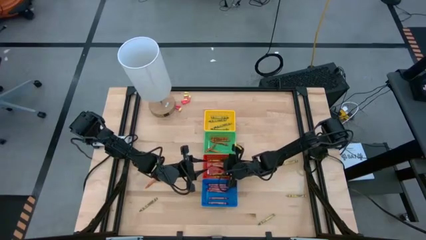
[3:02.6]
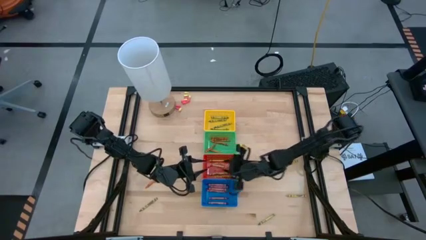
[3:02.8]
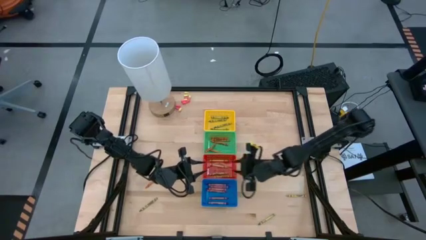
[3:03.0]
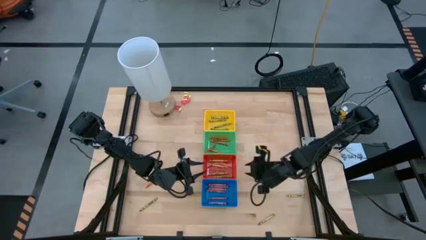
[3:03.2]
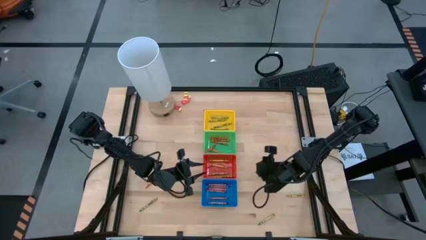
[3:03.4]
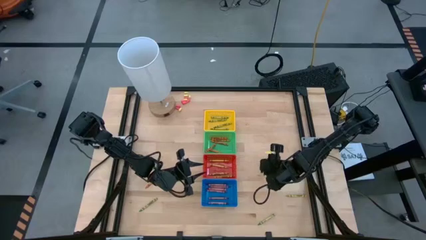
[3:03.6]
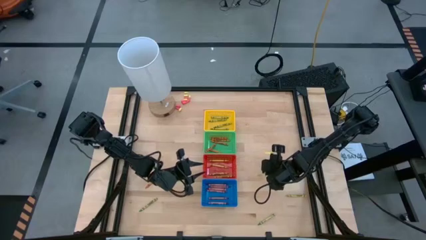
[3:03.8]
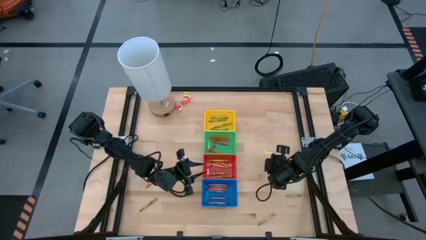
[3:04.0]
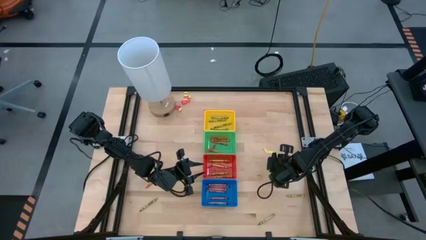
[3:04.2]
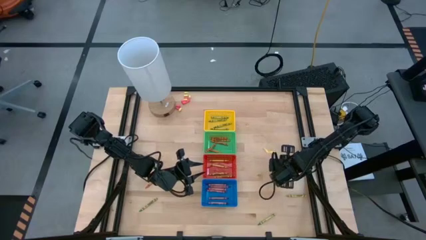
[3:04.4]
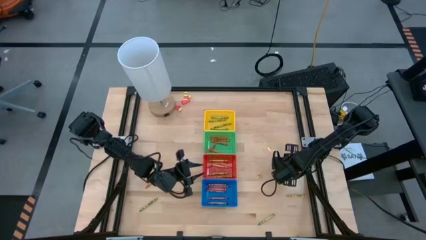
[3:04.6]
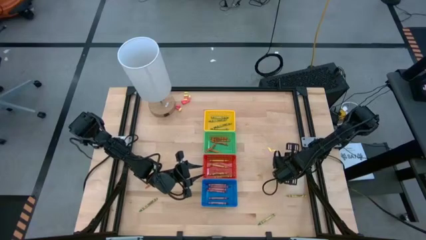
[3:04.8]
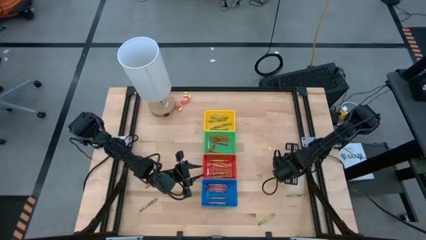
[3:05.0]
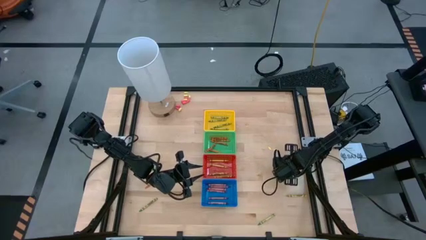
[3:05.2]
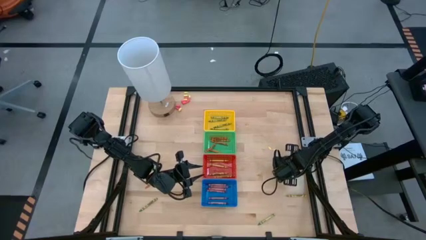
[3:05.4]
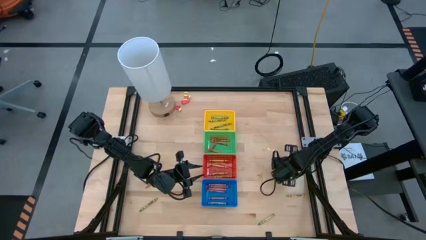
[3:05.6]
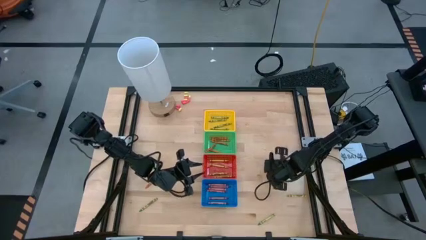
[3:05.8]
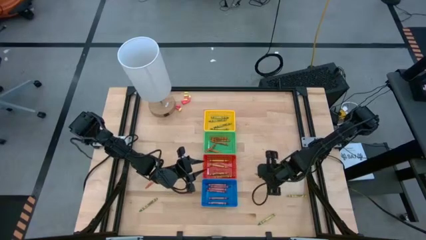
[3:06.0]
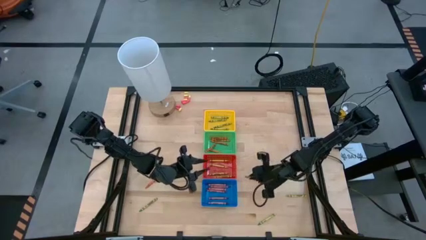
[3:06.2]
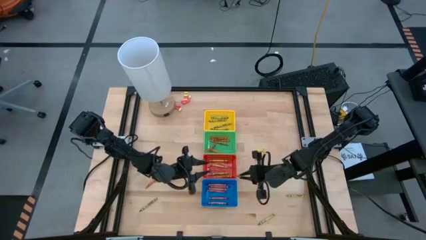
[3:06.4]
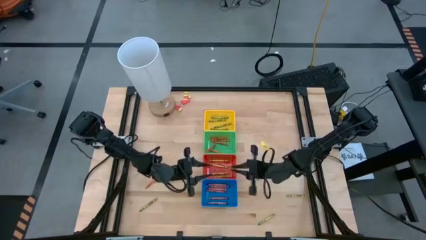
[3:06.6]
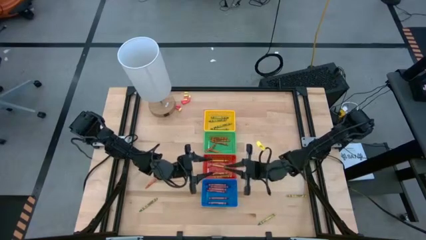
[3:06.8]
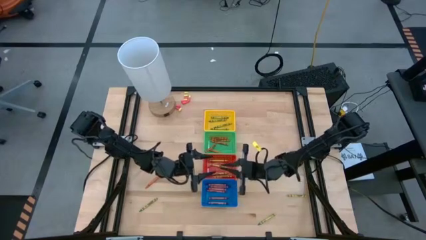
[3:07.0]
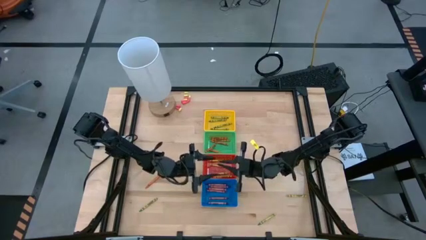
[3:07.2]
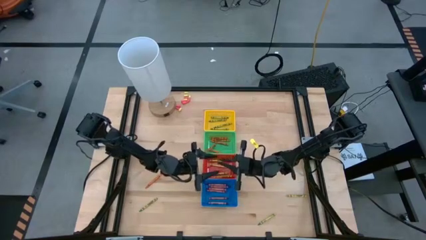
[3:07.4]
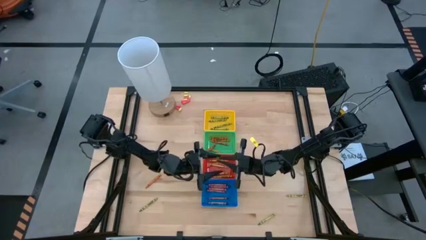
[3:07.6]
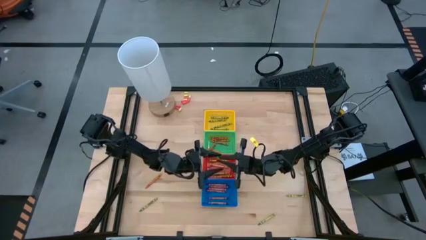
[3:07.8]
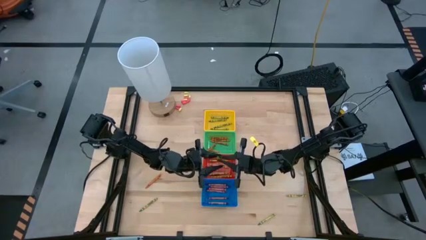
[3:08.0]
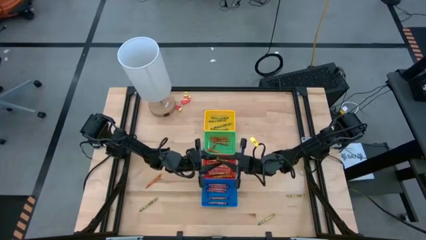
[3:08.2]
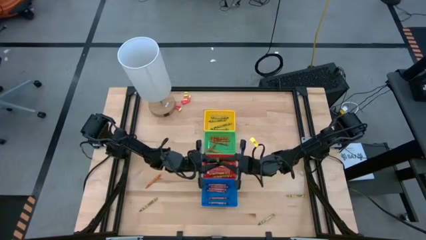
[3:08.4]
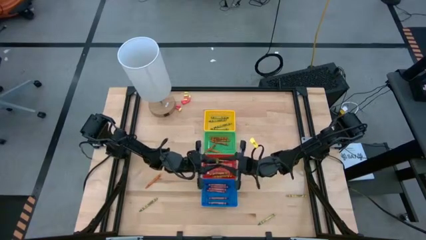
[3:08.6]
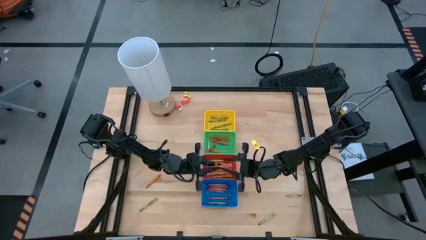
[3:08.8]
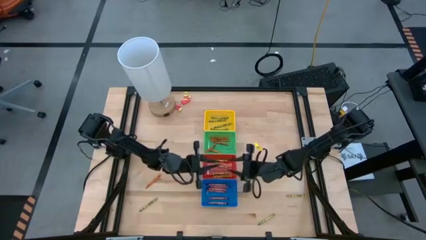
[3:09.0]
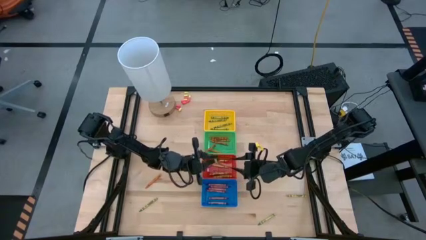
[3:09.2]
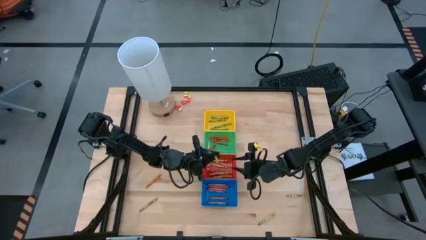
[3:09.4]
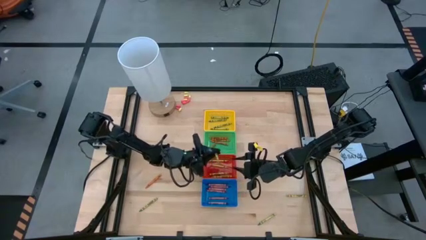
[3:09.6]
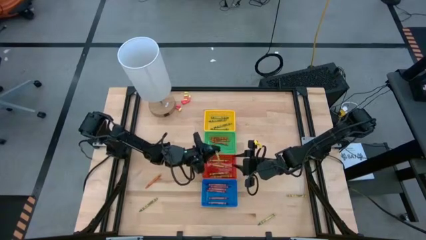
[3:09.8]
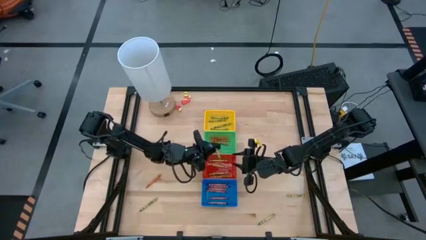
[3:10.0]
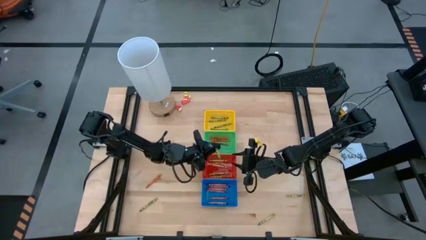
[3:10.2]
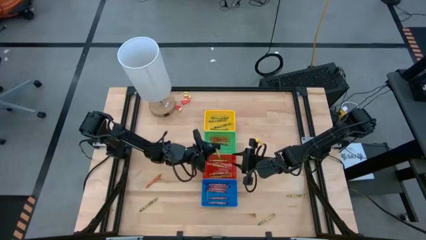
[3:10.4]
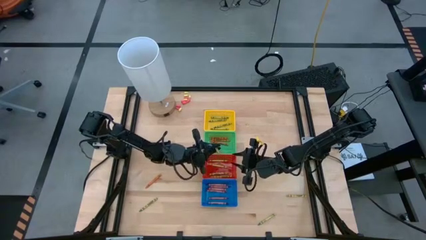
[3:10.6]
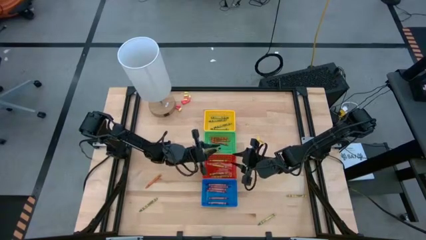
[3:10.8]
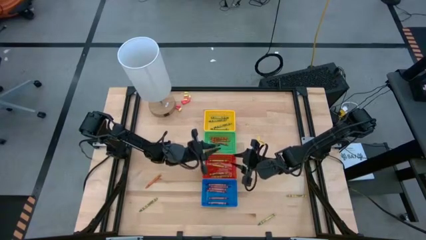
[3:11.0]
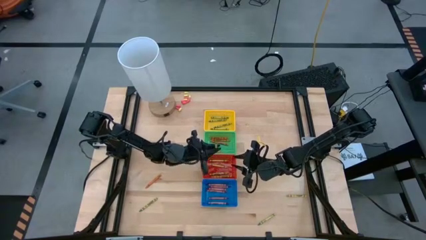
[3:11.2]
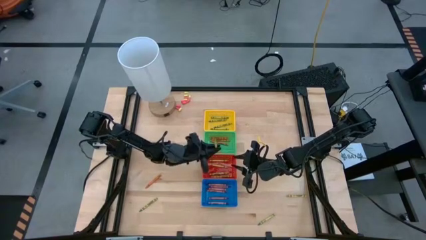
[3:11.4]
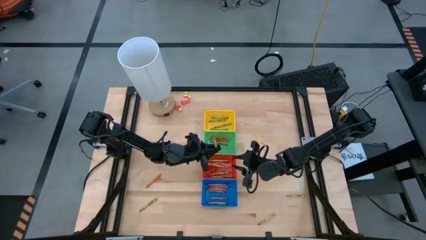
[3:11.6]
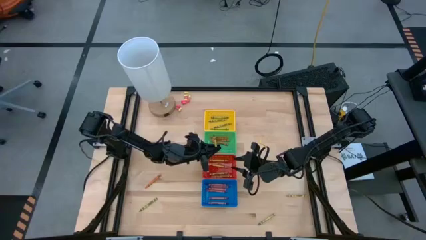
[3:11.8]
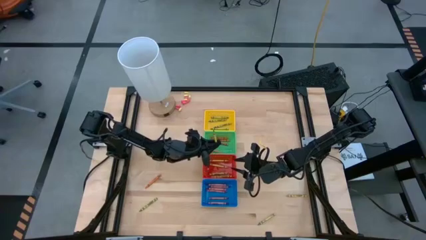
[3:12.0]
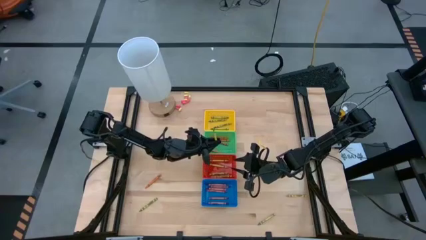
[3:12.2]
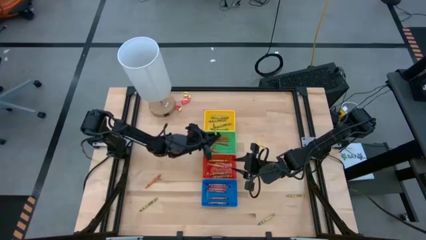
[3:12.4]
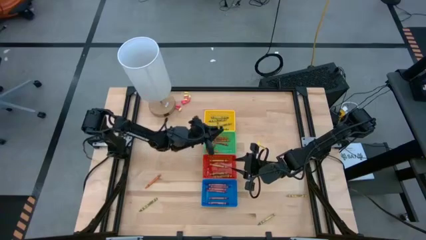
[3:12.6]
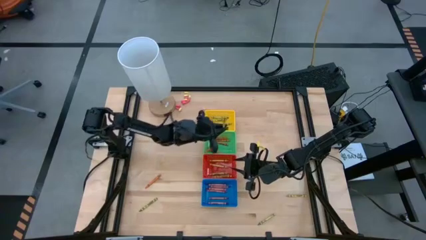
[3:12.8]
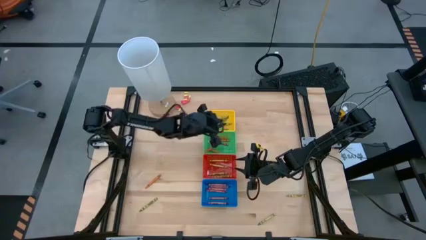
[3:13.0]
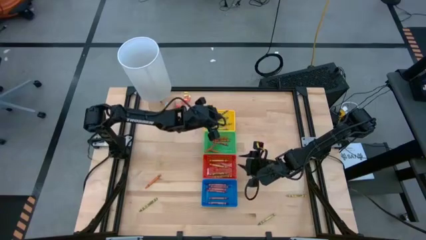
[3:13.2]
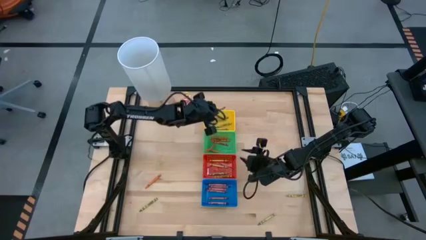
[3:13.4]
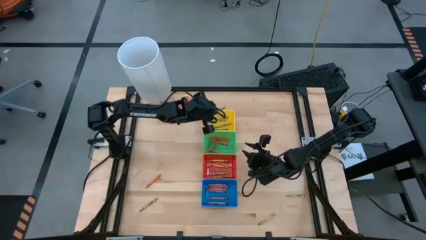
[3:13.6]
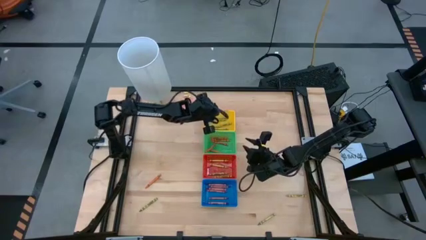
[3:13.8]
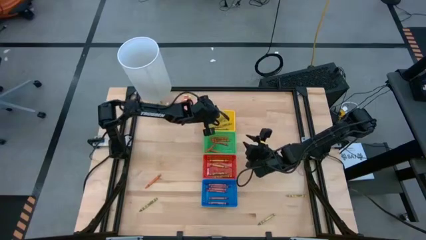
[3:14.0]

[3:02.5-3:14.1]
Task: Sort crayons
Put the green crayon into the yellow bin

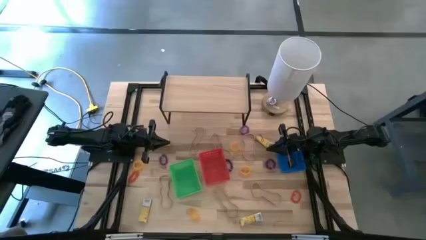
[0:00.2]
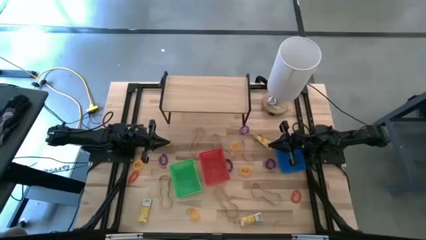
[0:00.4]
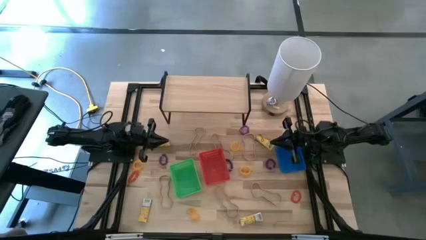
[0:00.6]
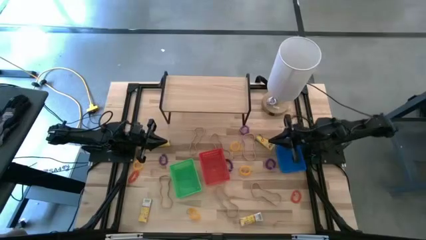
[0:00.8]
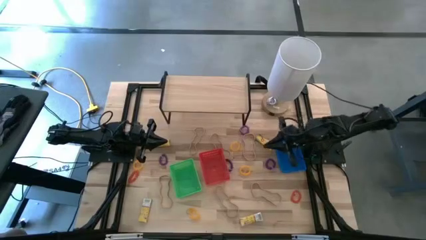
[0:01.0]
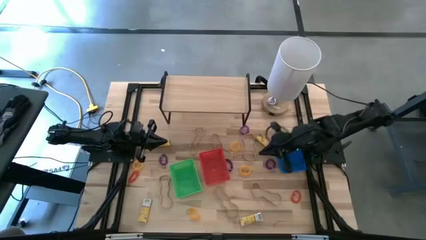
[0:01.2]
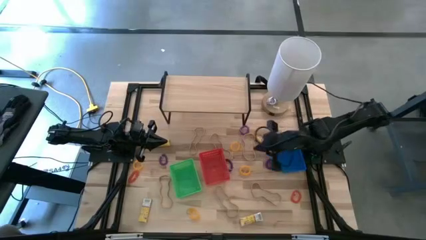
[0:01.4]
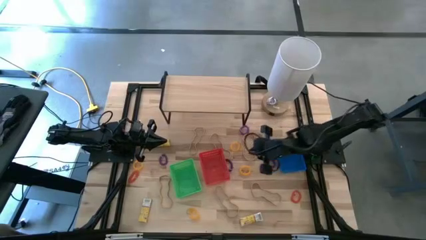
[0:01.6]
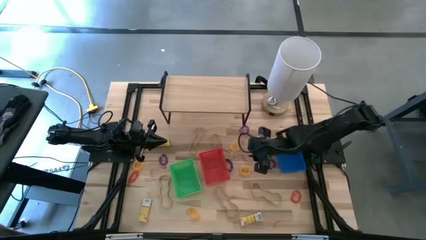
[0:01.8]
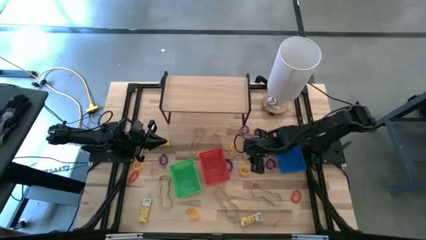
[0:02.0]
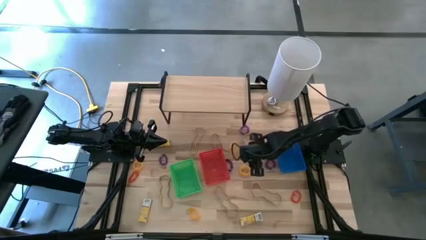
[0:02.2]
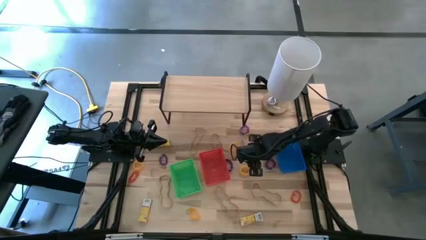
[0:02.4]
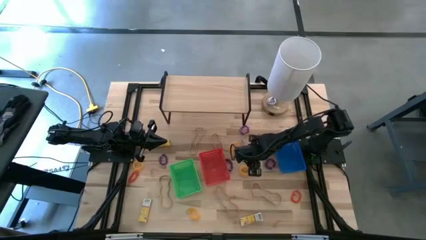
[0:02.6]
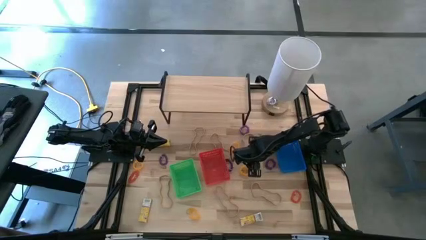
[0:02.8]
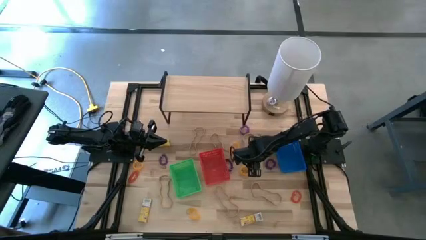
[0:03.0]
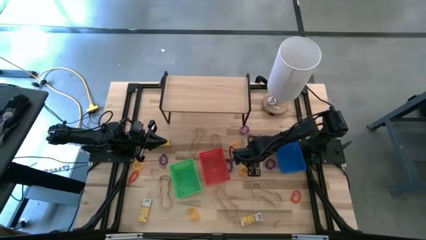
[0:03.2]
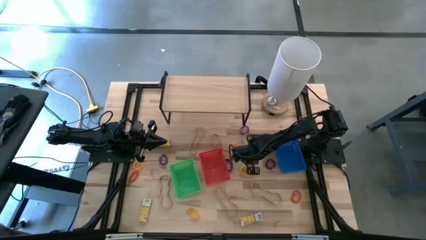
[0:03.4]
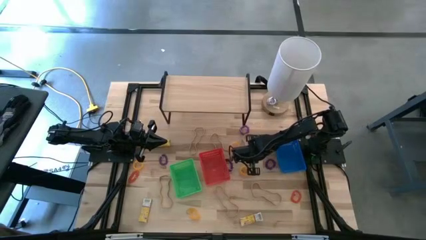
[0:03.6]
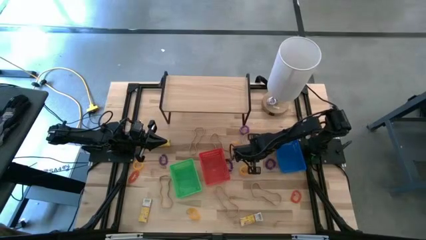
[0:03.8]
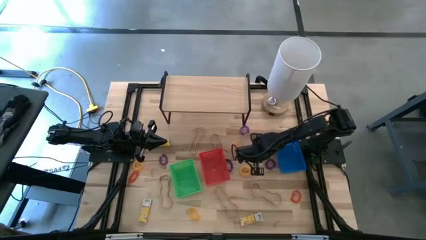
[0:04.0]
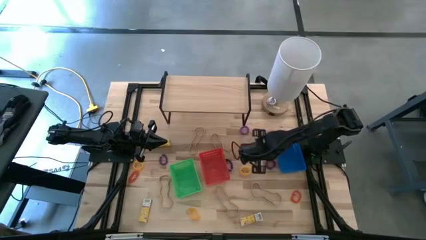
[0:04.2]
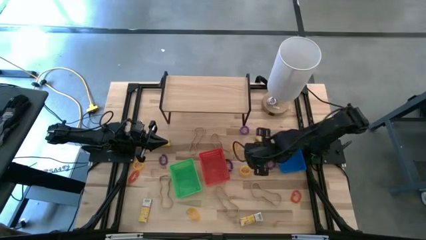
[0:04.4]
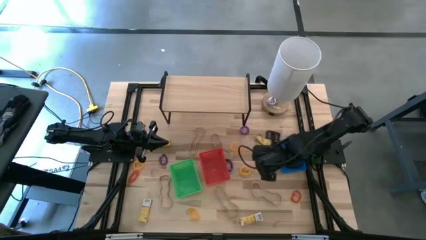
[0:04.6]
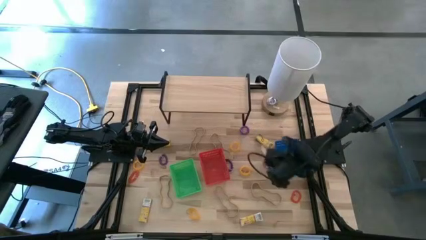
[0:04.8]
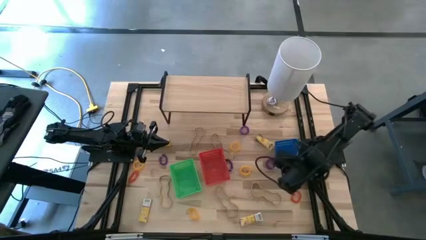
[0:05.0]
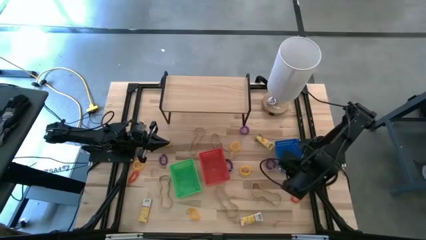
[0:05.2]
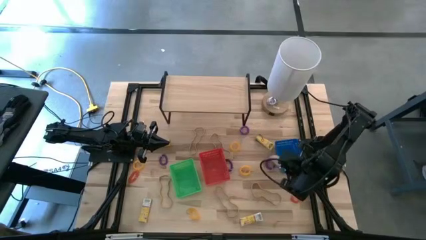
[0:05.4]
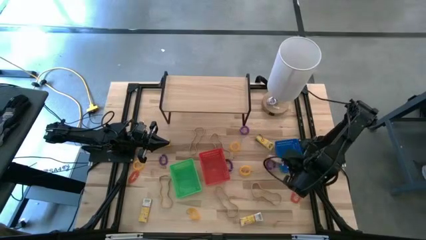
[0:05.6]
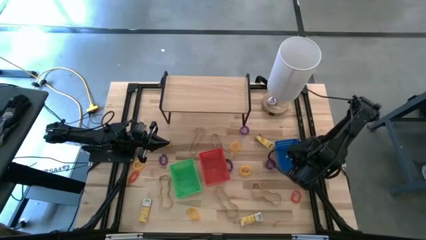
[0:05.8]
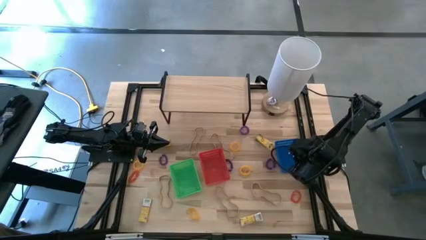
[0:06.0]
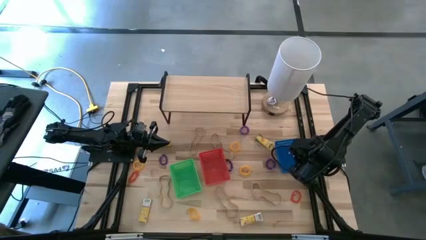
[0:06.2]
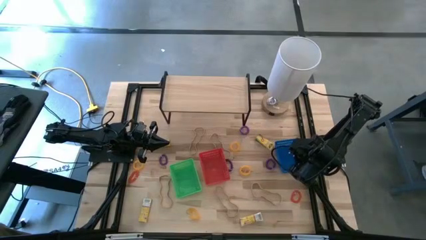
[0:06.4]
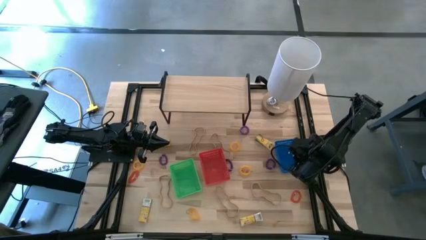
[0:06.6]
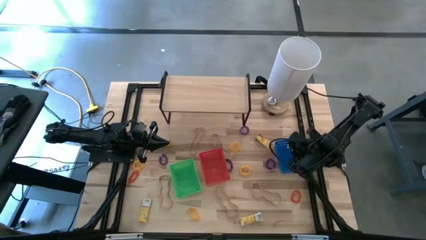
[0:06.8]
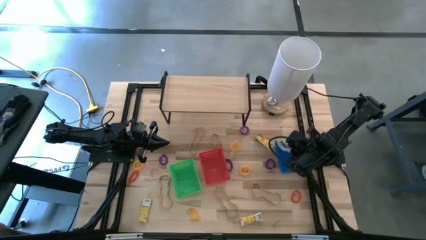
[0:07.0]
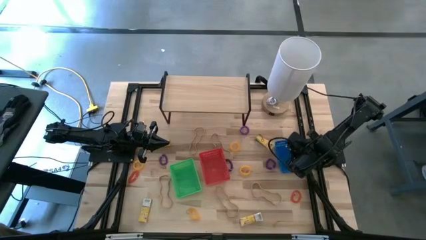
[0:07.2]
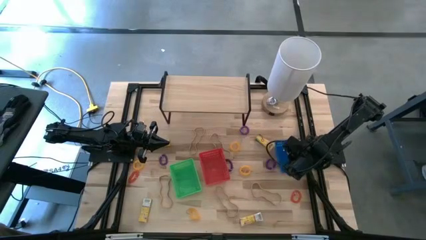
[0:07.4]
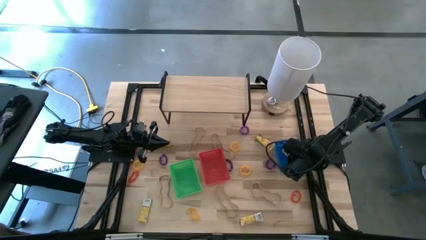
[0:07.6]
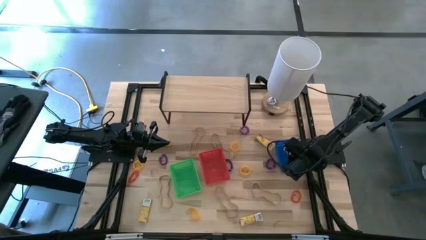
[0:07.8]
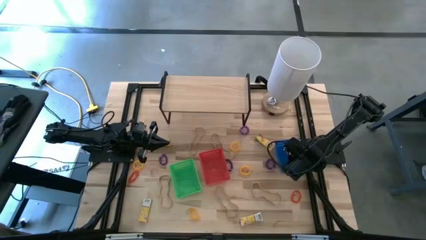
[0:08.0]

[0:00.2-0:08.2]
Task: Pick & Place Office Desk Supplies
Put the white rubber band into the blue bin
